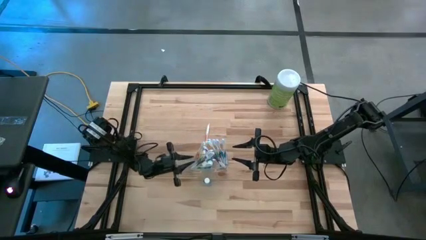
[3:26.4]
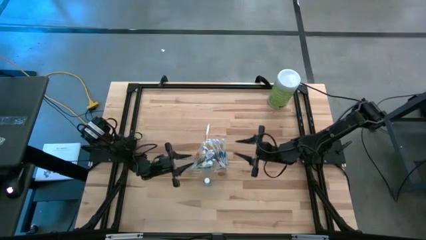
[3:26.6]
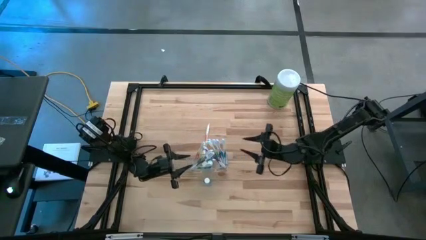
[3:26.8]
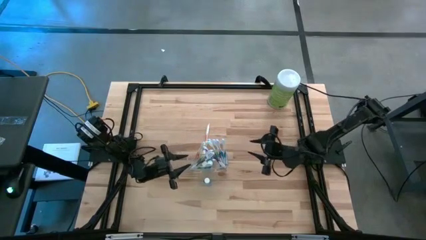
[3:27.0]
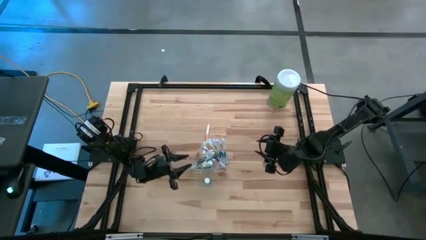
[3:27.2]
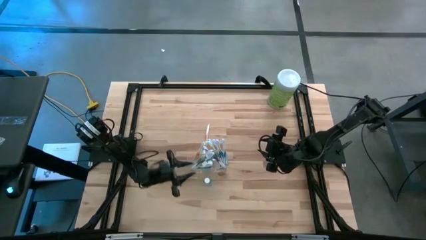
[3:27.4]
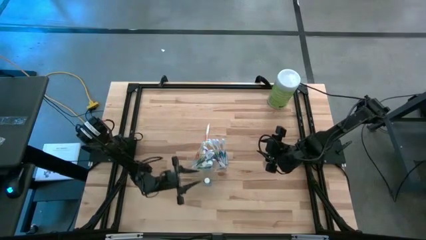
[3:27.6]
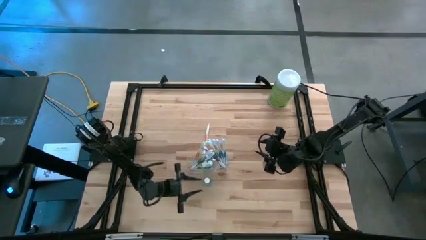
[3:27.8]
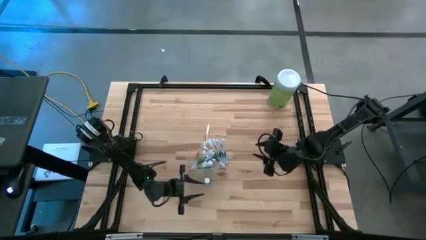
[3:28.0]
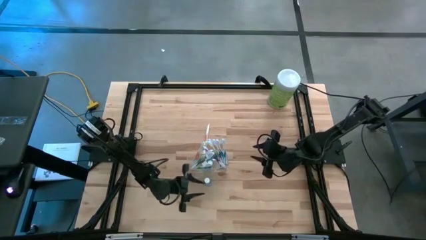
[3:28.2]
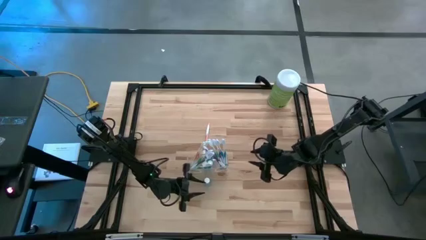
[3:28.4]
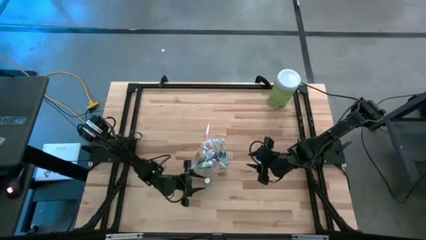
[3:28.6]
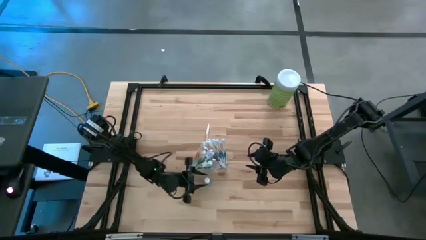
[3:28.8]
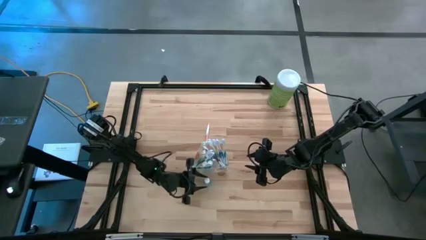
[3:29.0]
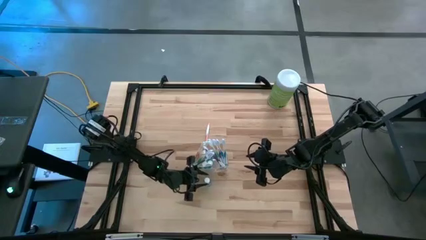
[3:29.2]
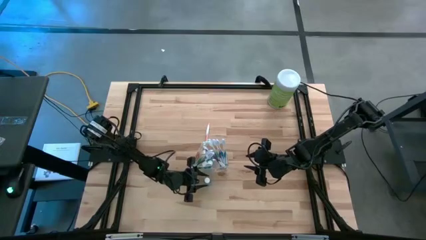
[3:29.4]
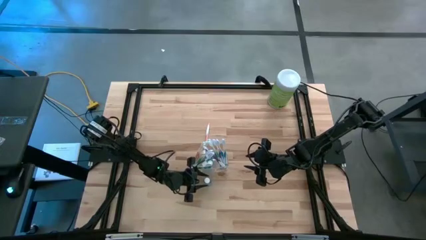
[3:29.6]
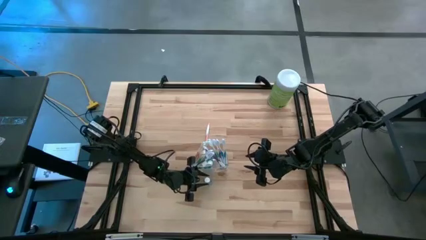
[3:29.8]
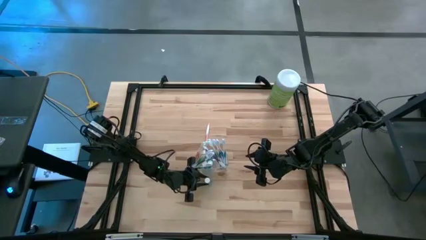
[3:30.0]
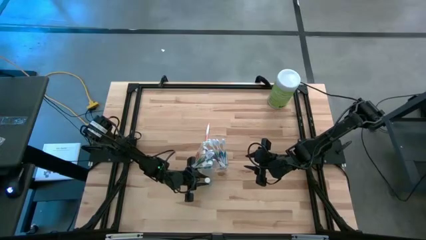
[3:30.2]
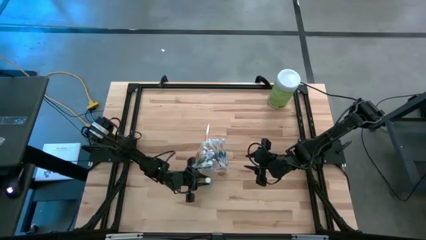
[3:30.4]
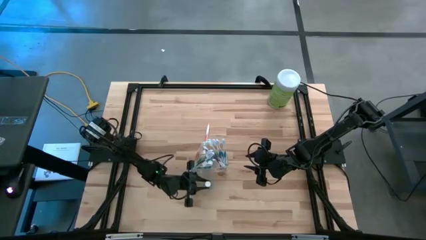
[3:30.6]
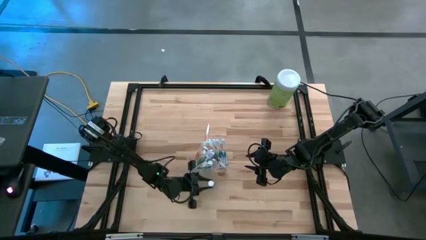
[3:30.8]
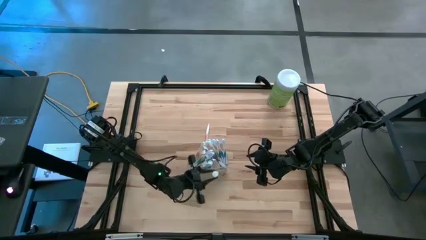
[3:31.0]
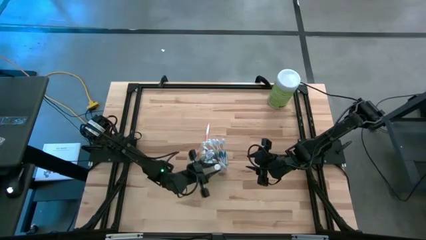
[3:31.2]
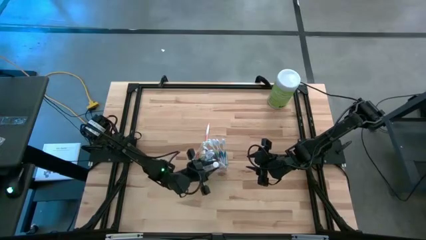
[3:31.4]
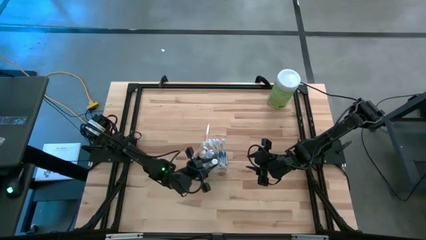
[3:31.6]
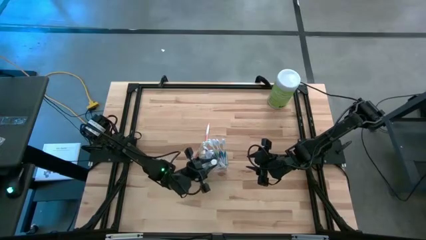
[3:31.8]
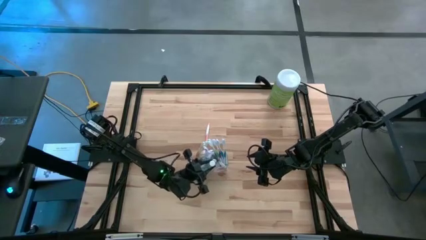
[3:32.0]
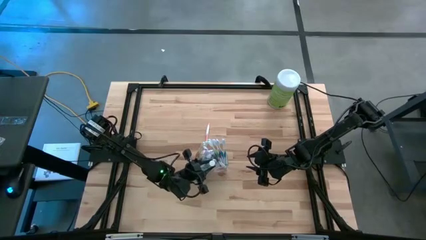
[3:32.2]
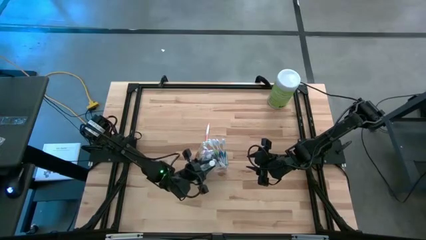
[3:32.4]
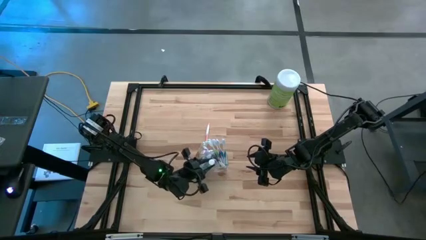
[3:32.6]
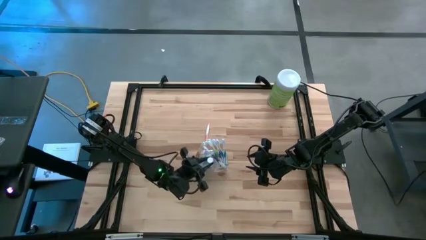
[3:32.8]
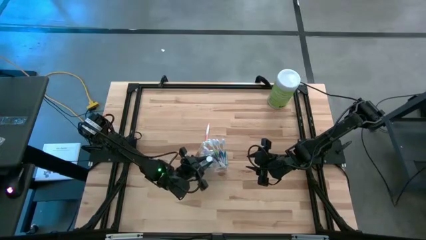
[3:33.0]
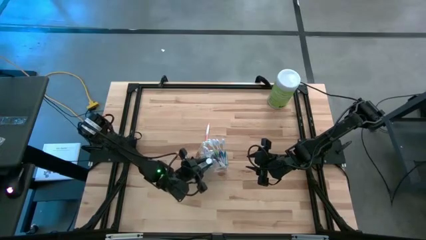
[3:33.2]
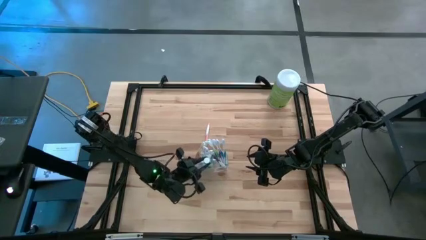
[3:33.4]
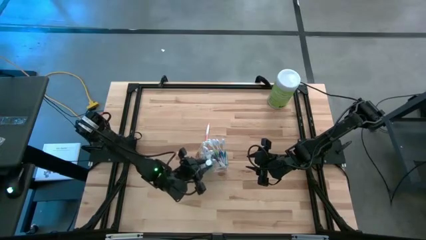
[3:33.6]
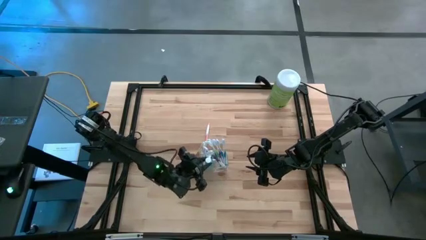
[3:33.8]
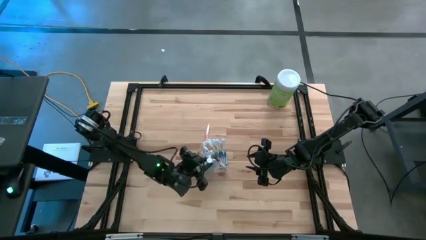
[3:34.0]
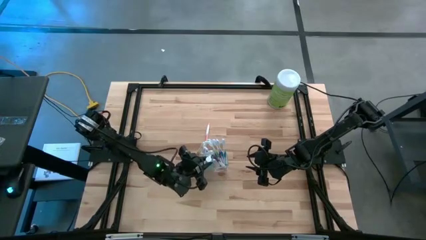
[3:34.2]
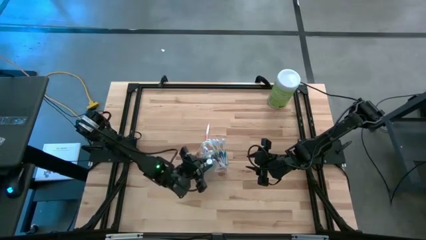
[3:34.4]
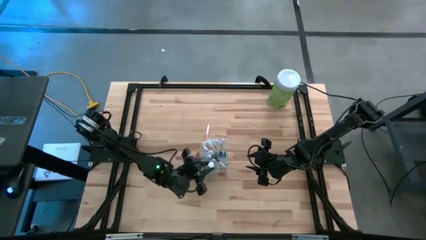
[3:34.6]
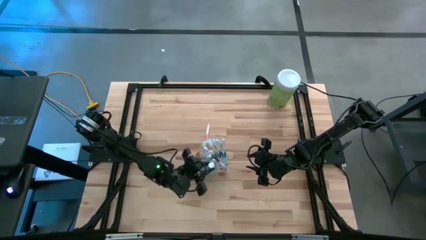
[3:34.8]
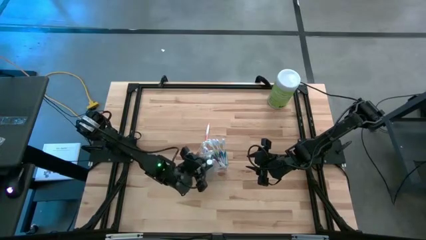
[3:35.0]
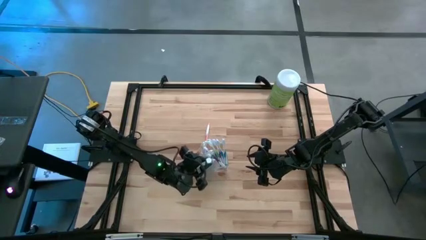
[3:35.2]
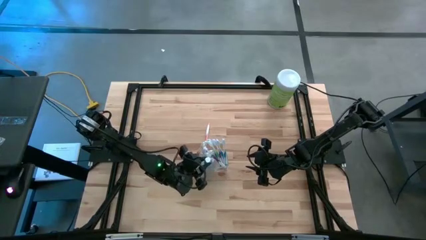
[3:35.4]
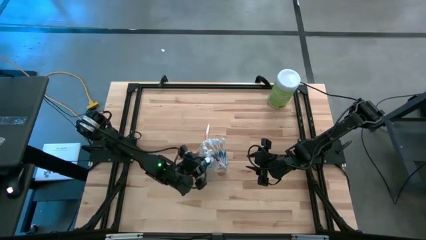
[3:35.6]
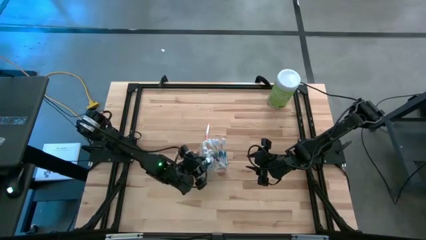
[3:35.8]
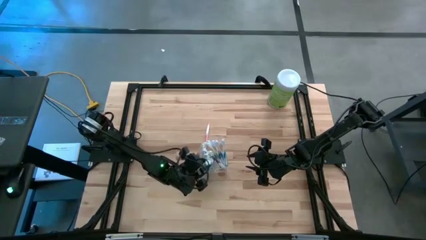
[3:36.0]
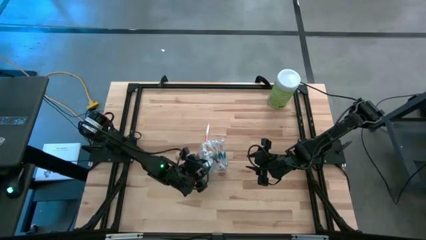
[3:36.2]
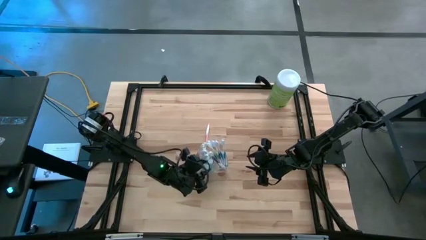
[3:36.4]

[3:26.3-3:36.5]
Task: Pick & Place toothbrushing station
Put the blue mouthwash into the transparent organizer

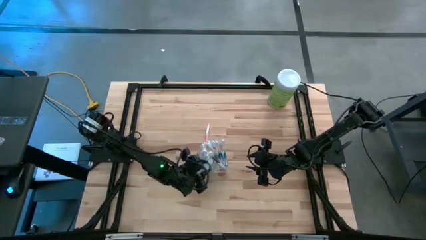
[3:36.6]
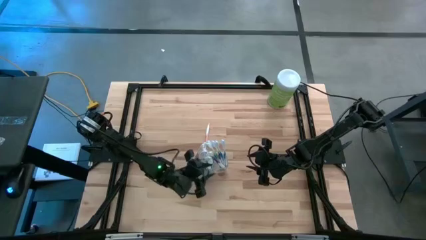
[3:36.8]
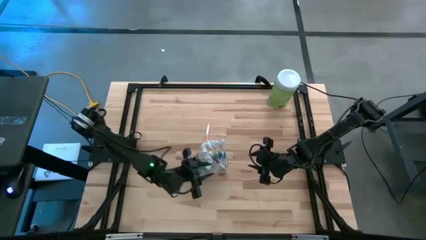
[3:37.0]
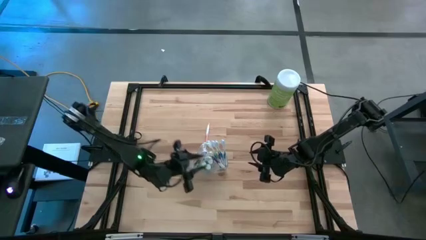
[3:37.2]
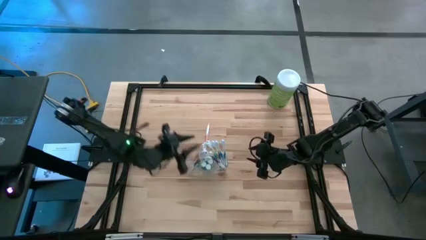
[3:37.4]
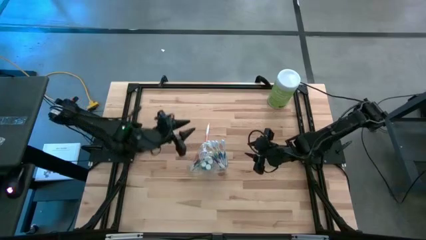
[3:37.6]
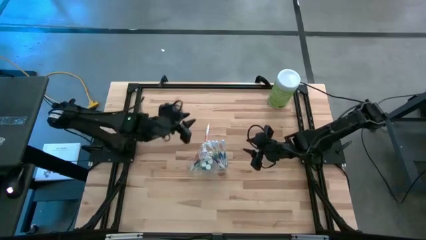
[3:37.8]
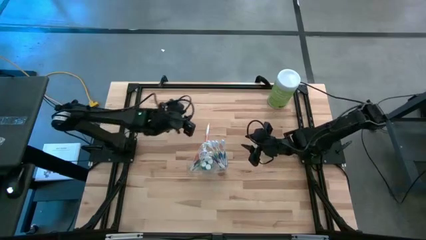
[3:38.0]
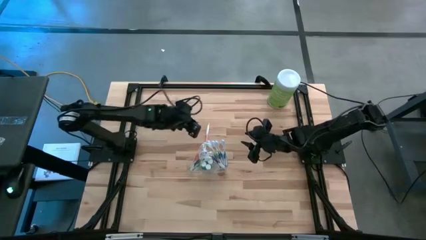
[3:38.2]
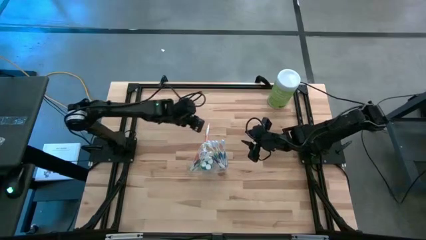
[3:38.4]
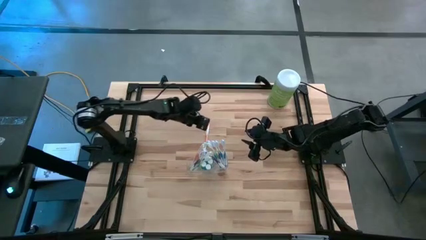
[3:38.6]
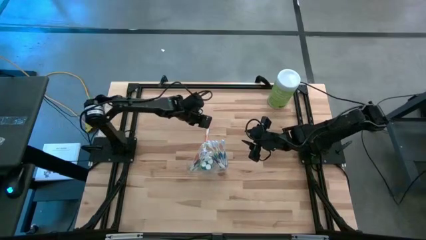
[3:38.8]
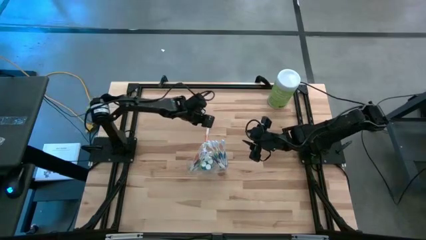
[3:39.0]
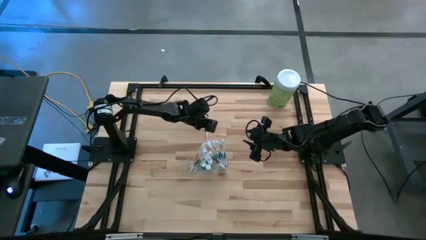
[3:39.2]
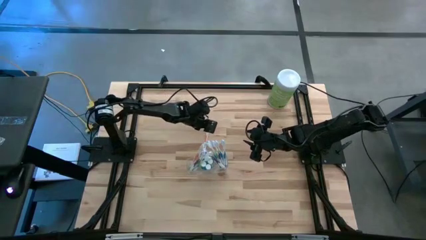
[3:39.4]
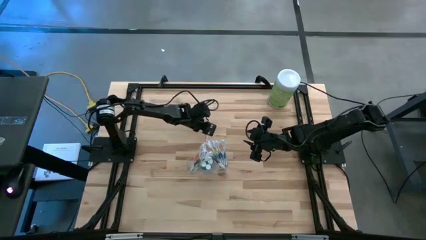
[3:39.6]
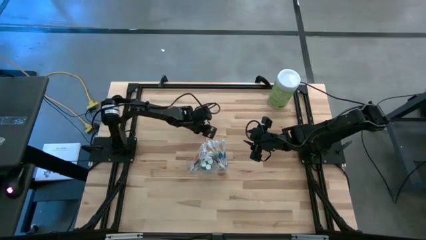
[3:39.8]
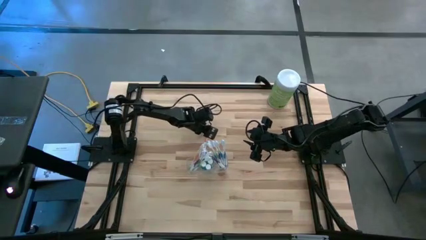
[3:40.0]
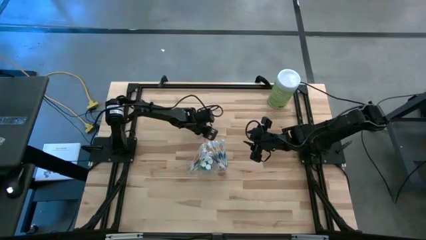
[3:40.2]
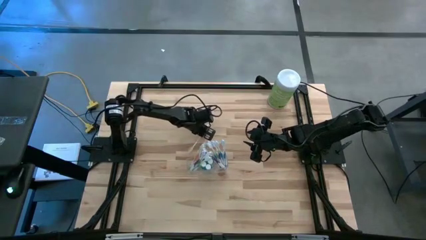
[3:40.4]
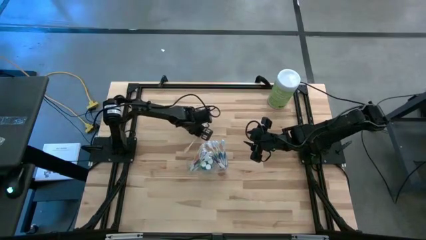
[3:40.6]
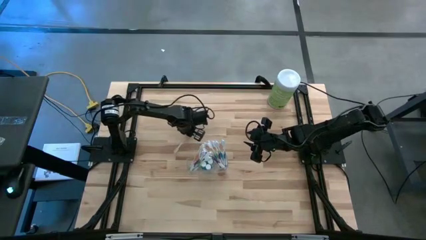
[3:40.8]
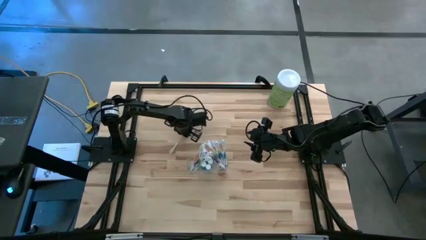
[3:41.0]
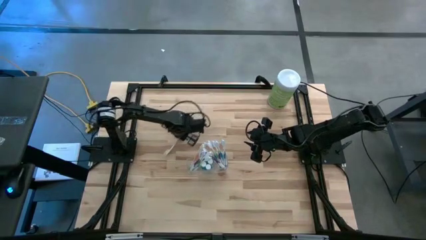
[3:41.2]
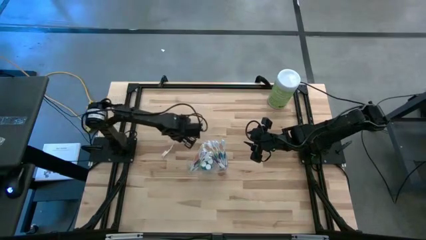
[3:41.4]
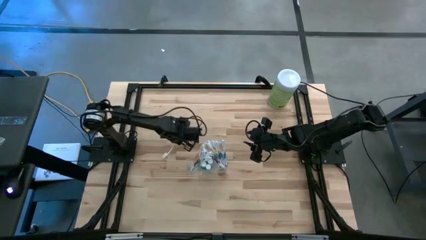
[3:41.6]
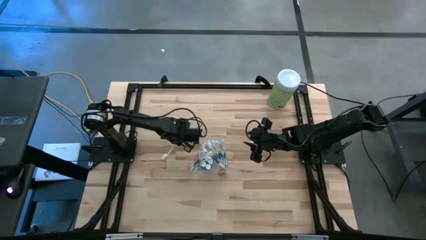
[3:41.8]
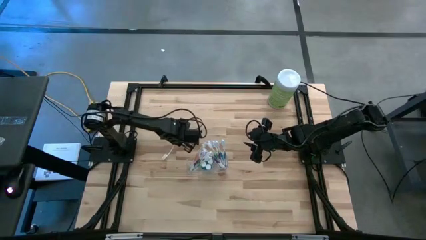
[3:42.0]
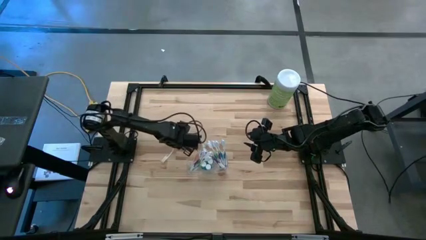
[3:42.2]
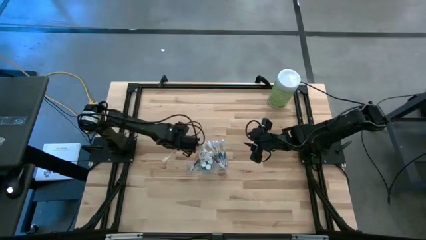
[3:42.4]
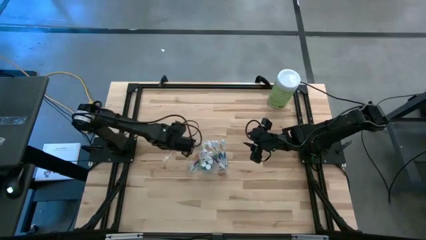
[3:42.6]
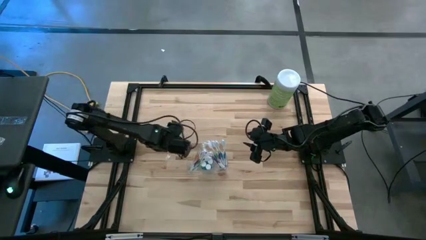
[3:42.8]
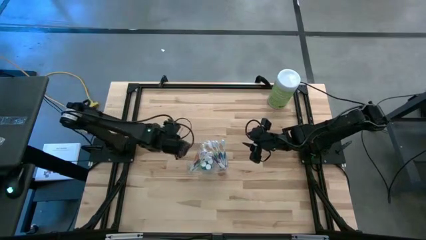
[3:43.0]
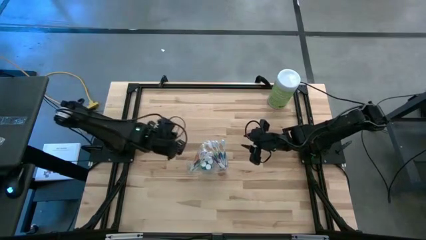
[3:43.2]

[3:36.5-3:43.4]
Put the orange toothbrush into the transparent organizer
